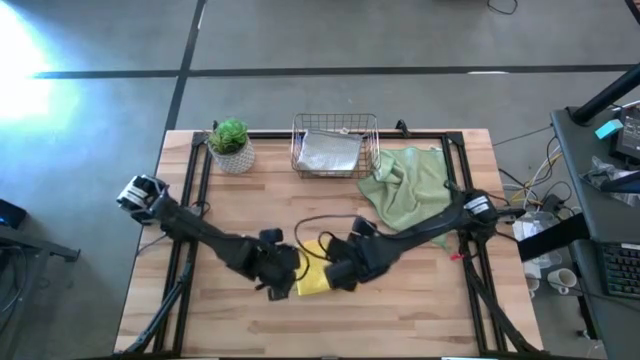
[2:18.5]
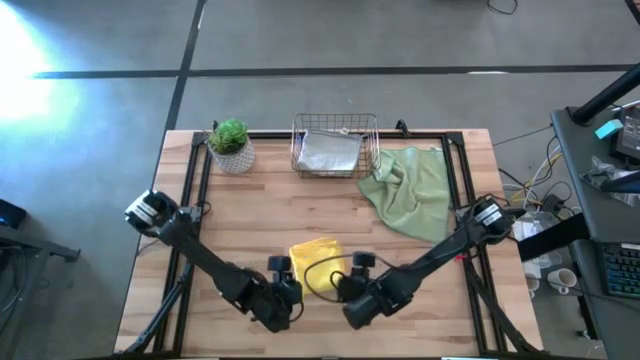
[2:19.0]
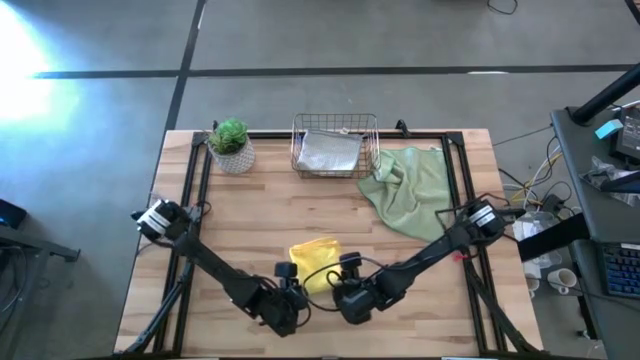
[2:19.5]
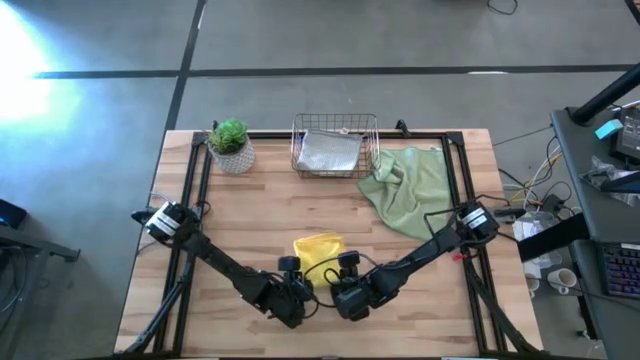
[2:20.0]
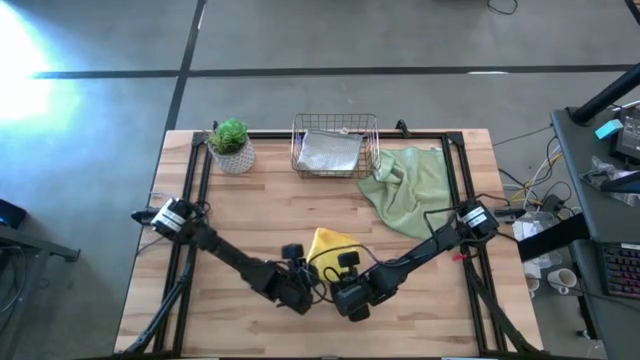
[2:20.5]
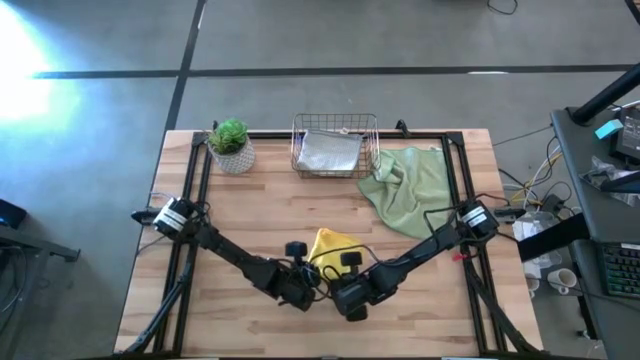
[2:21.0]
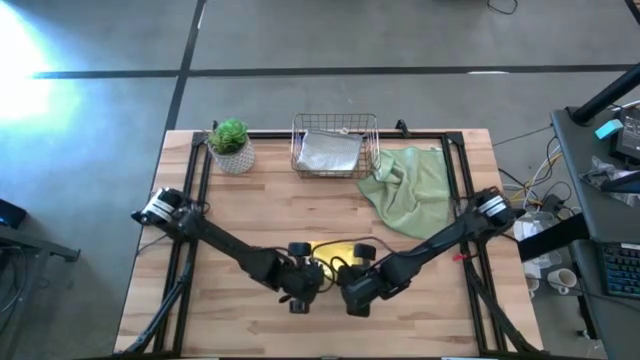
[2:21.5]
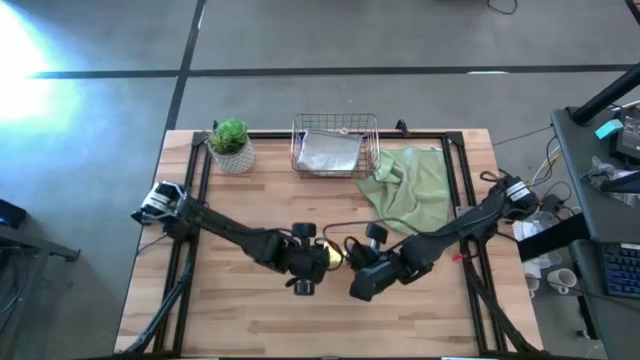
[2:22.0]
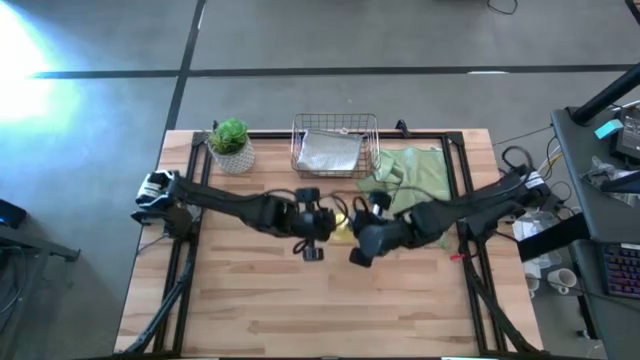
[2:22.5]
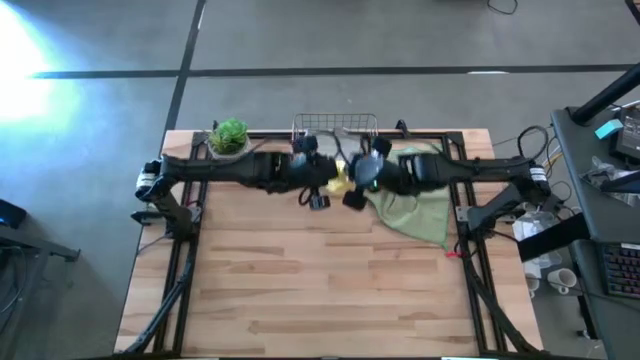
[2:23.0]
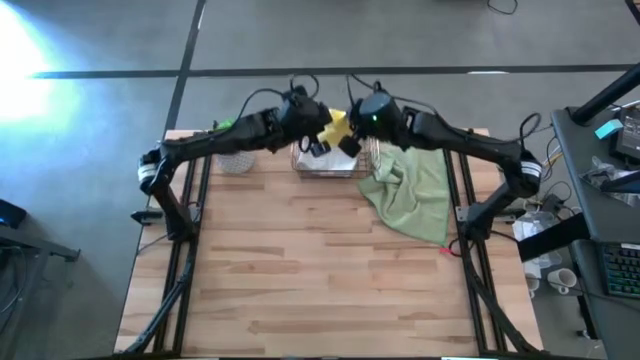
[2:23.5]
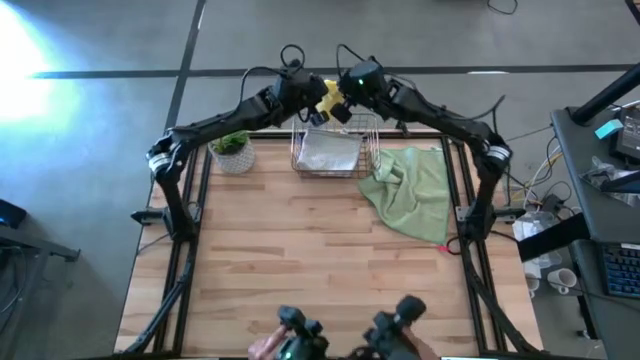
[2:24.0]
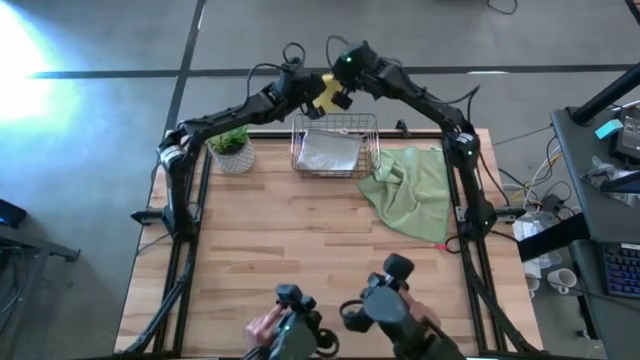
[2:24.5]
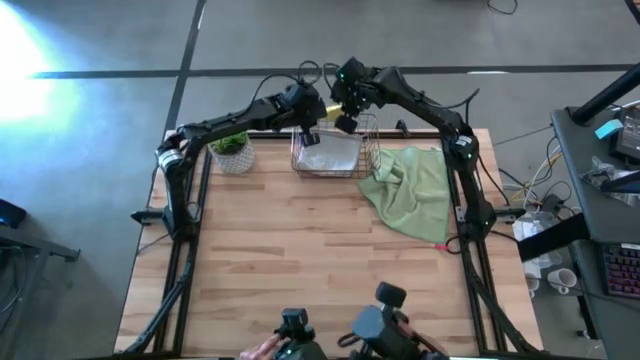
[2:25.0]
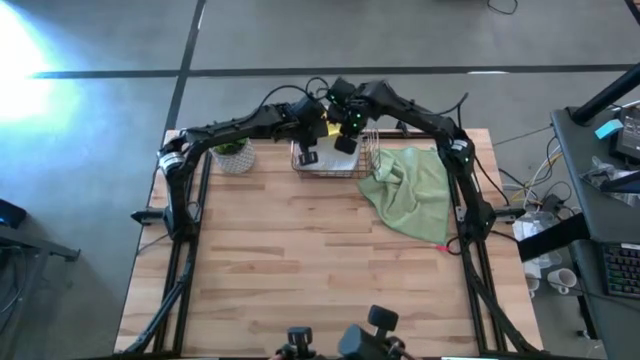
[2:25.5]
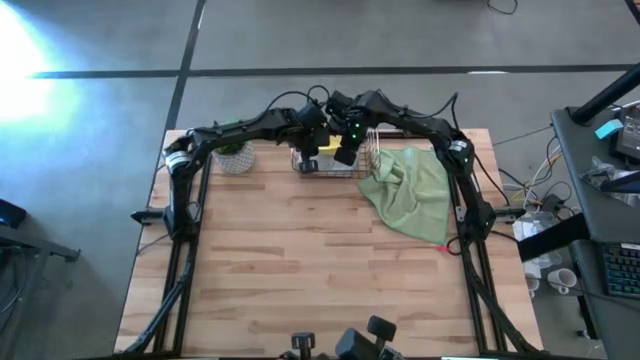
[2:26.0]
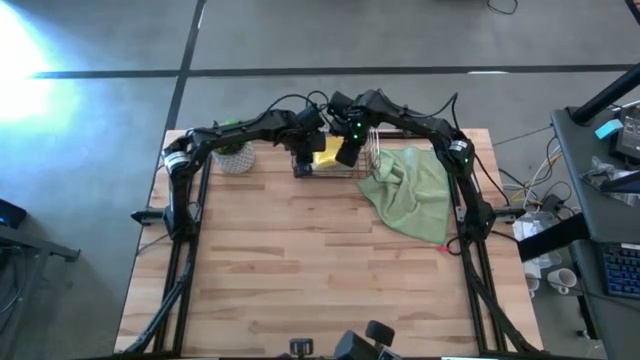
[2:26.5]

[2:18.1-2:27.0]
Task: Fold microfiber towels
Put the folded yellow towel into the wire basket

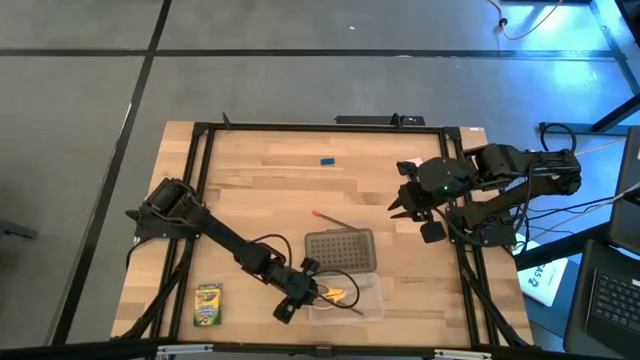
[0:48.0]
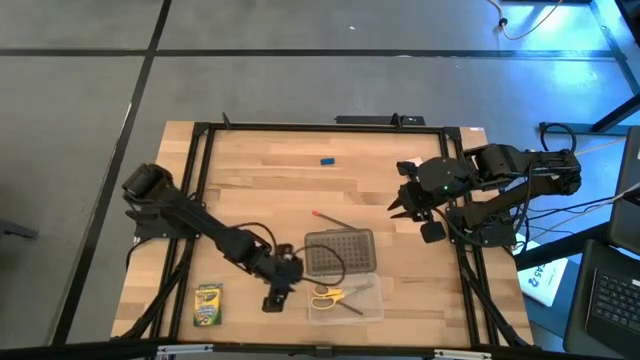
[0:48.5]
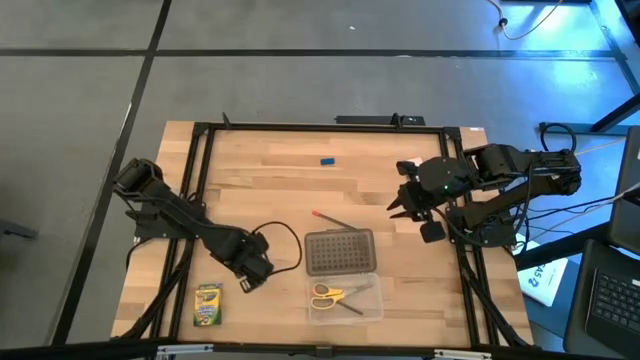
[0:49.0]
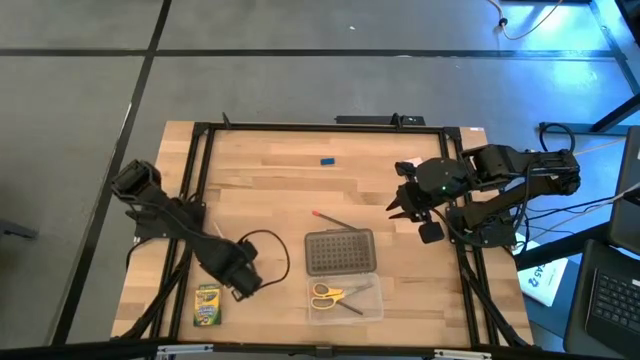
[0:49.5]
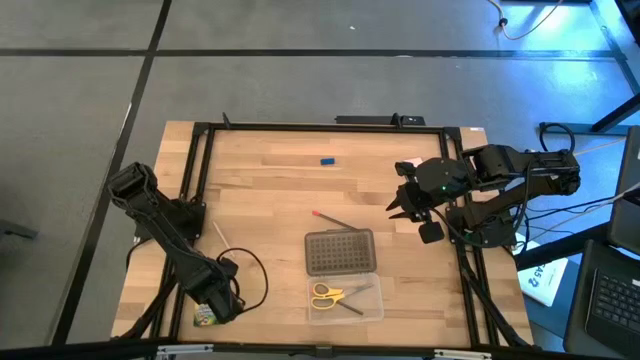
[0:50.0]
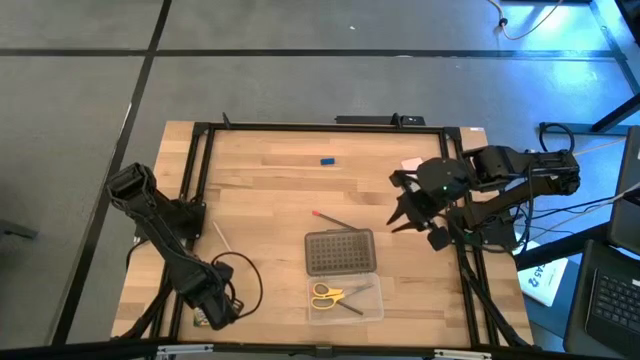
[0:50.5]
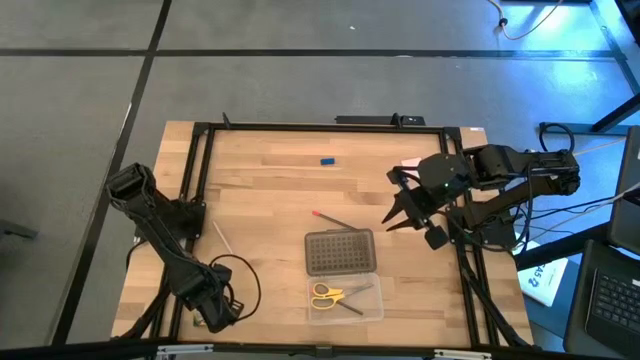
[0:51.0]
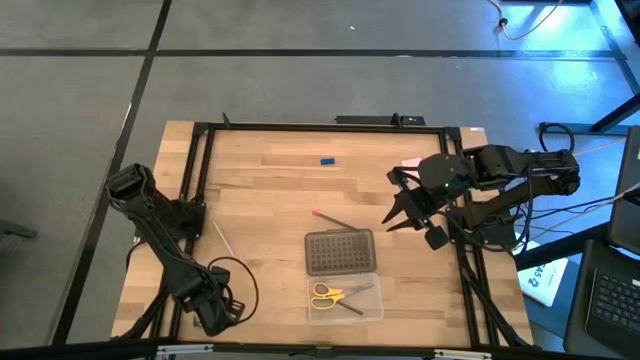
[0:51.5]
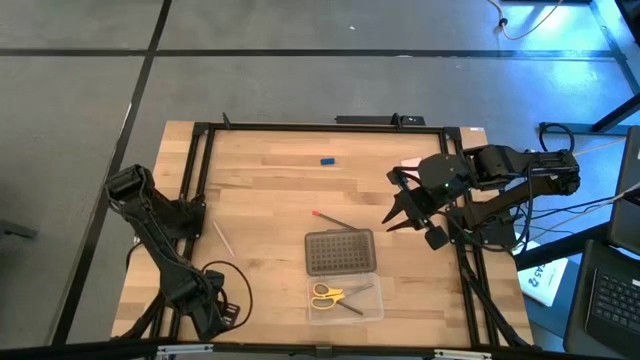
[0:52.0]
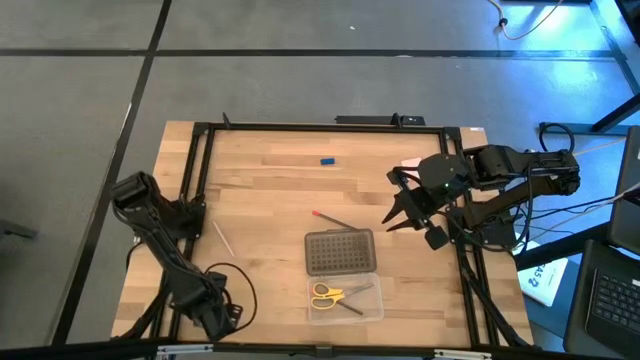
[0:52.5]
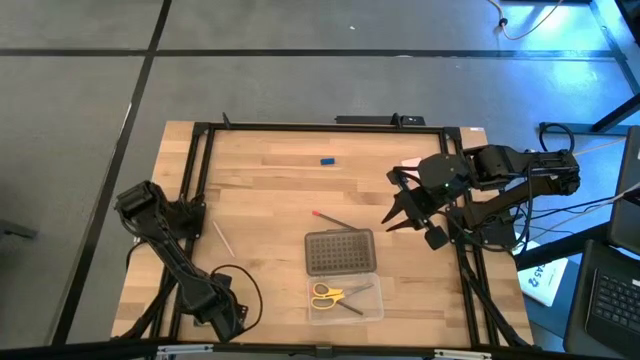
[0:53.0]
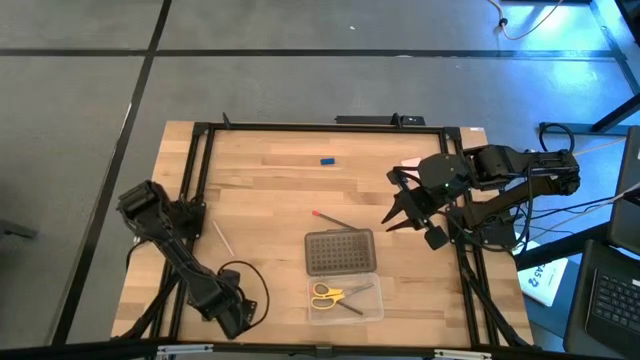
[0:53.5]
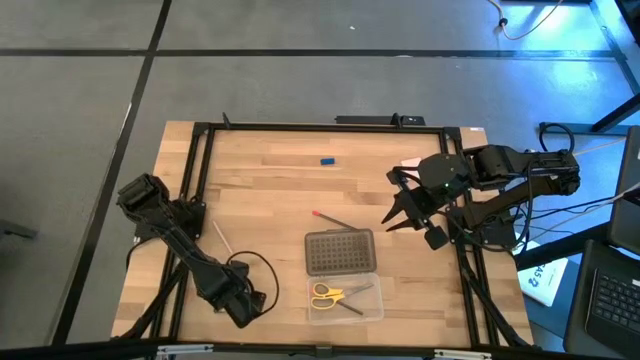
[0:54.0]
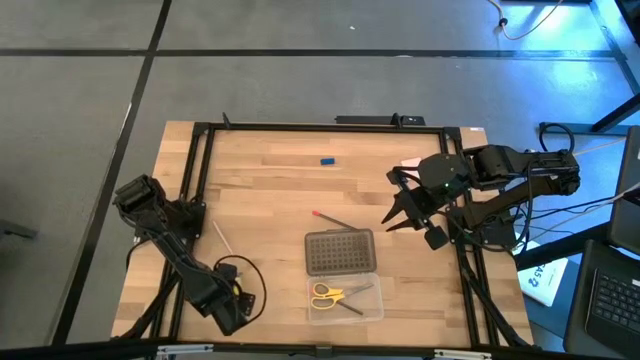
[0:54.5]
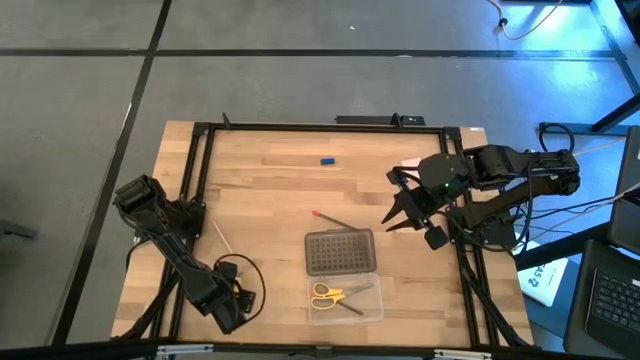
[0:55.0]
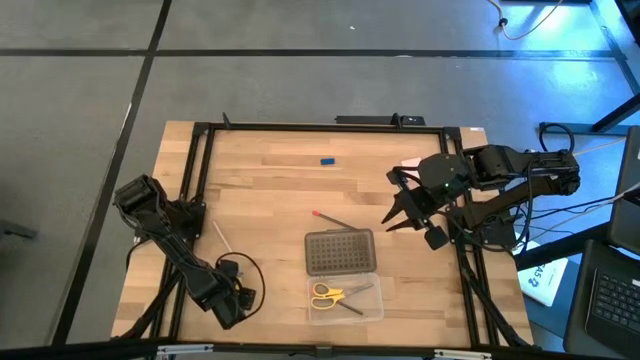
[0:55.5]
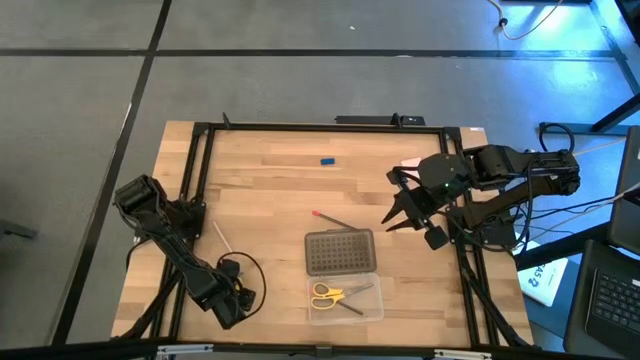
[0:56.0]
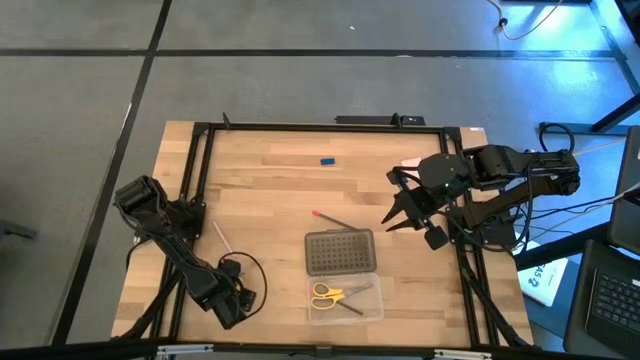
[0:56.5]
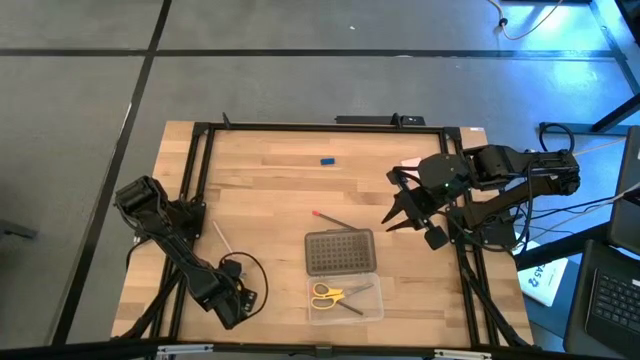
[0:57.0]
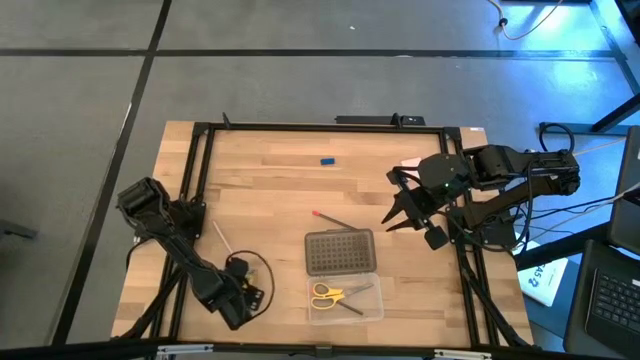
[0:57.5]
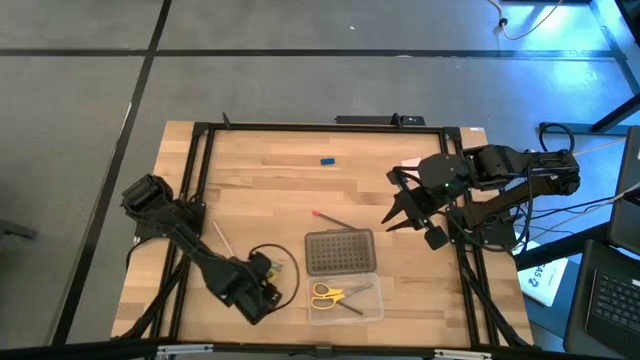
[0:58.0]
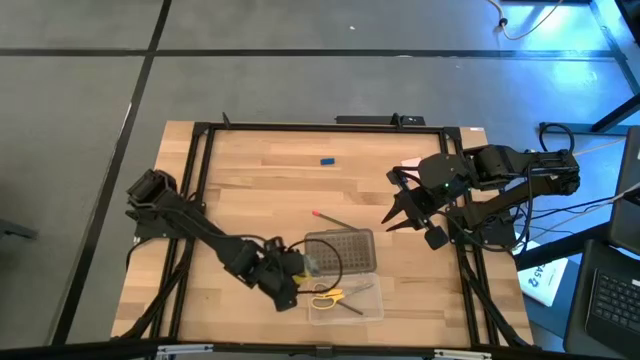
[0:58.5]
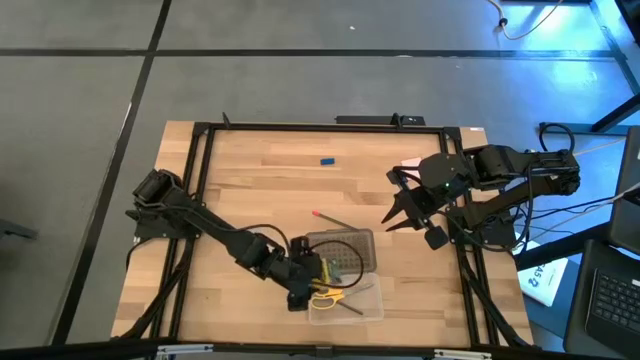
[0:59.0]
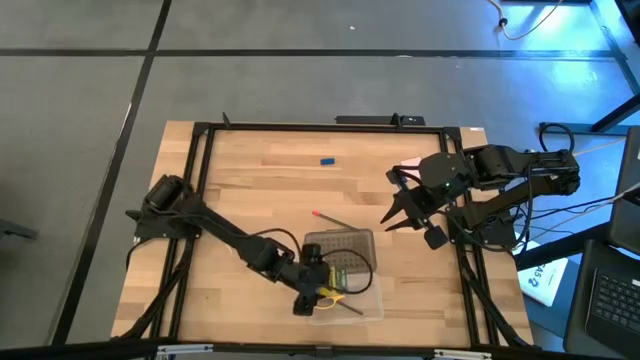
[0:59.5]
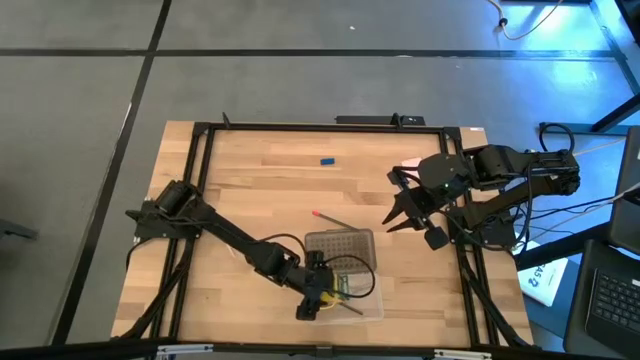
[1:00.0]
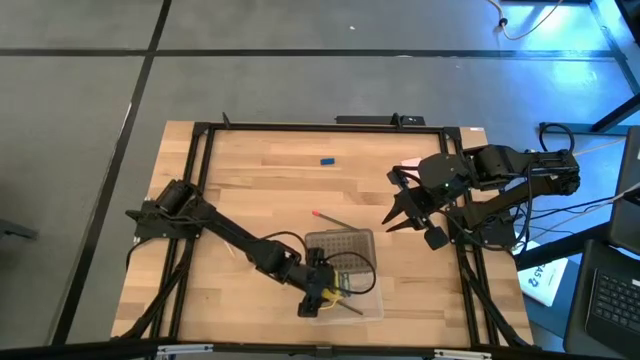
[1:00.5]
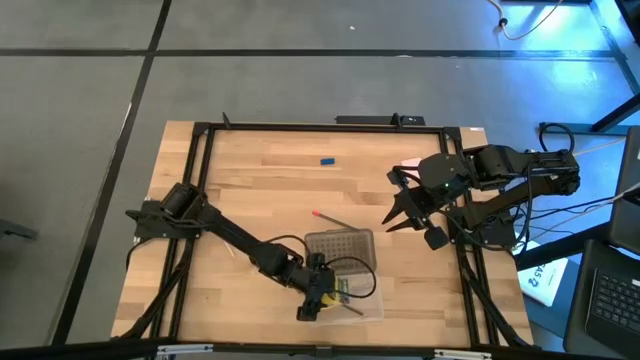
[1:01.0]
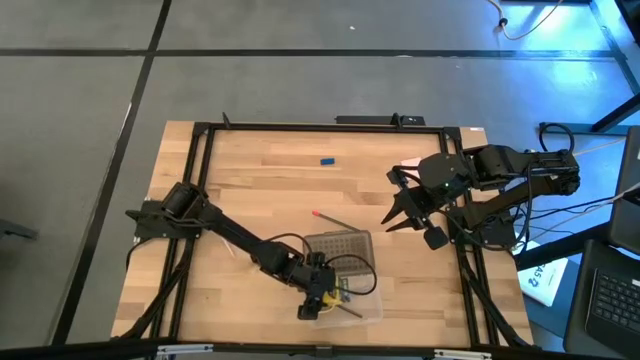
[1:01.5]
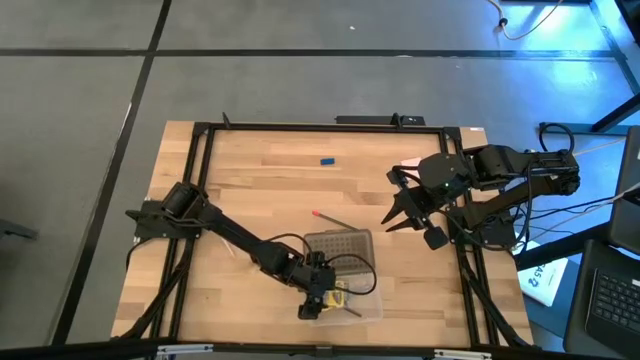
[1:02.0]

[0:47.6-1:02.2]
Task: Pack school essentials
Put the crayon box into the supply box
